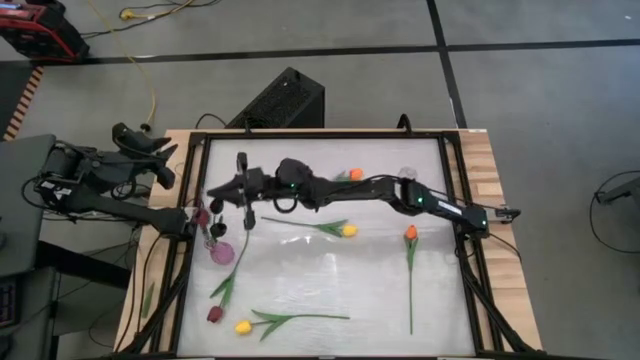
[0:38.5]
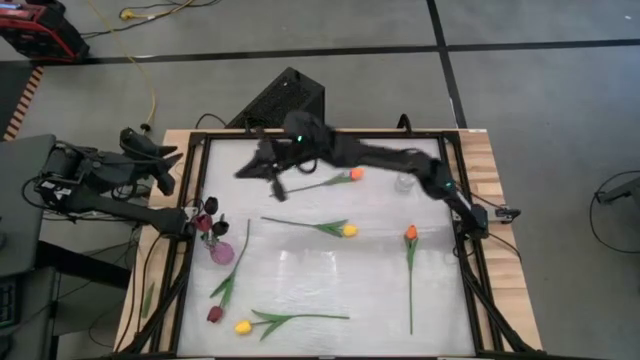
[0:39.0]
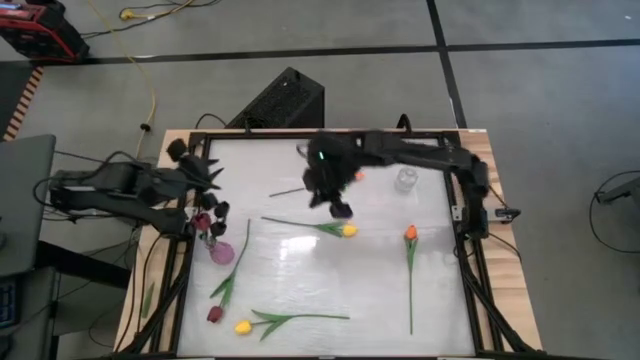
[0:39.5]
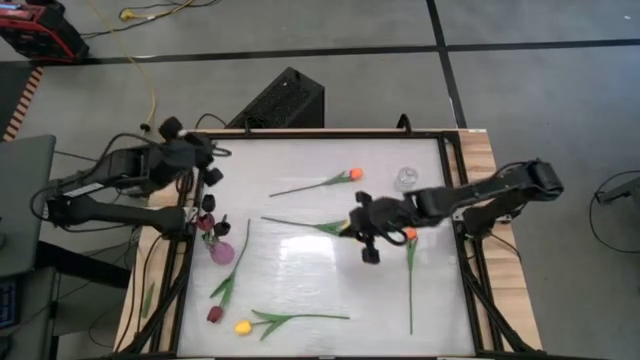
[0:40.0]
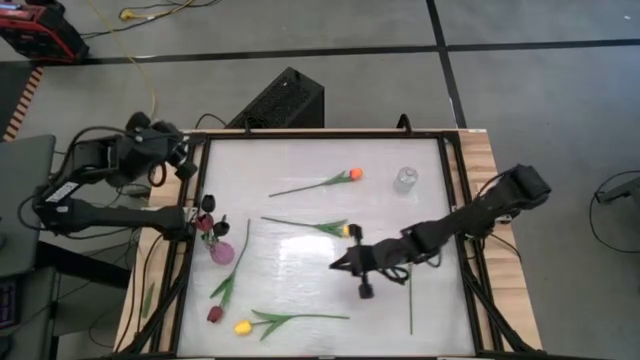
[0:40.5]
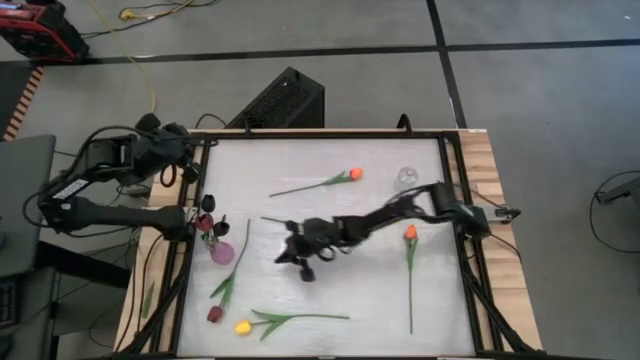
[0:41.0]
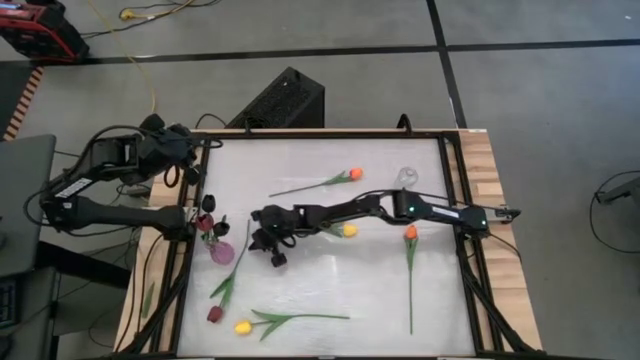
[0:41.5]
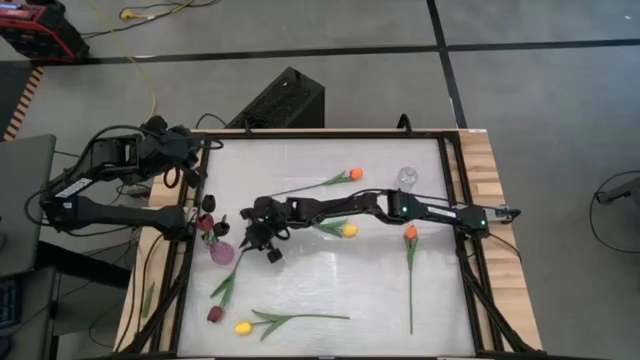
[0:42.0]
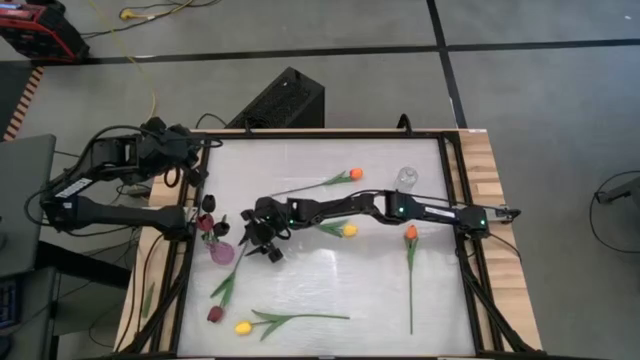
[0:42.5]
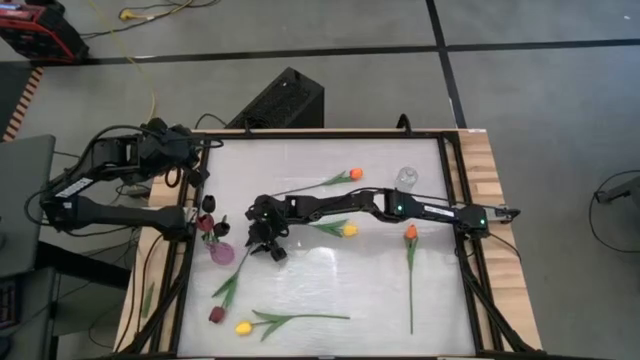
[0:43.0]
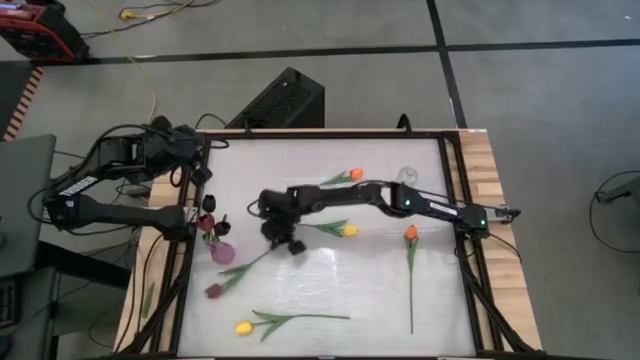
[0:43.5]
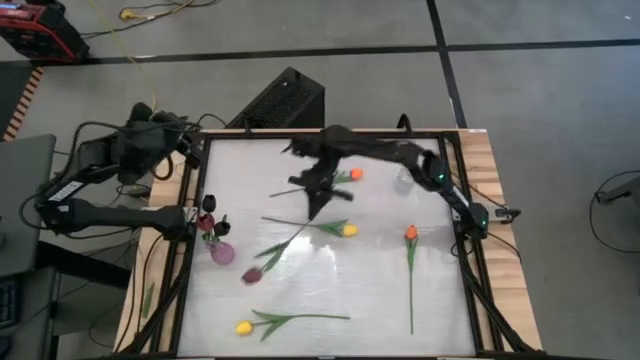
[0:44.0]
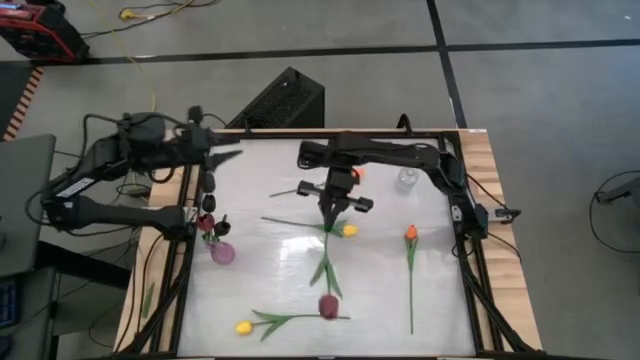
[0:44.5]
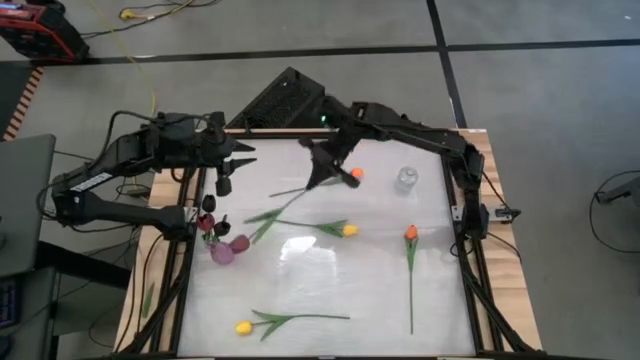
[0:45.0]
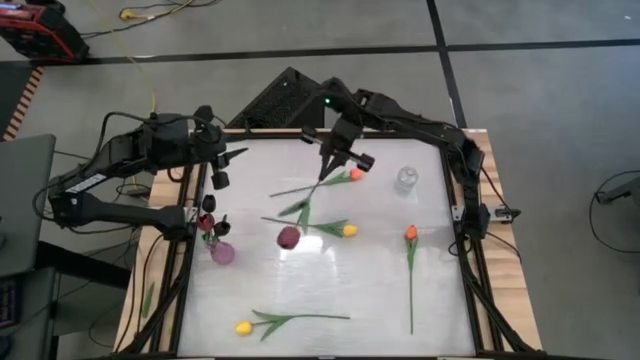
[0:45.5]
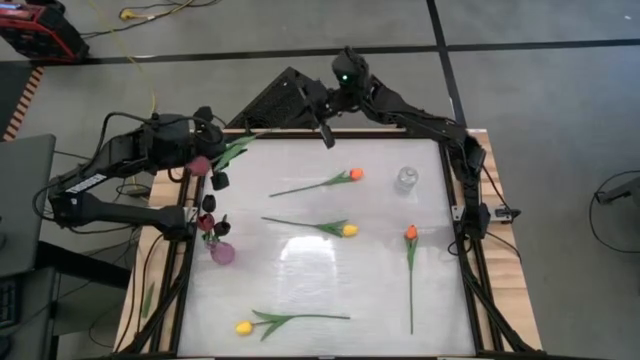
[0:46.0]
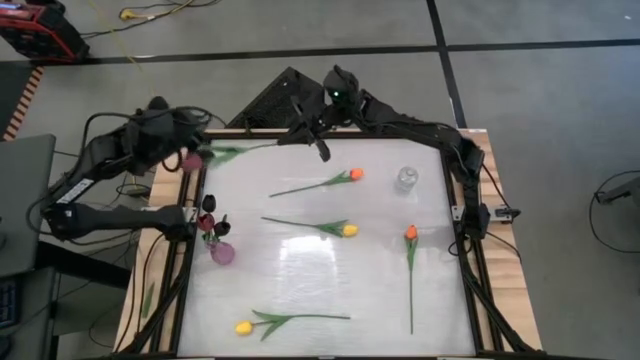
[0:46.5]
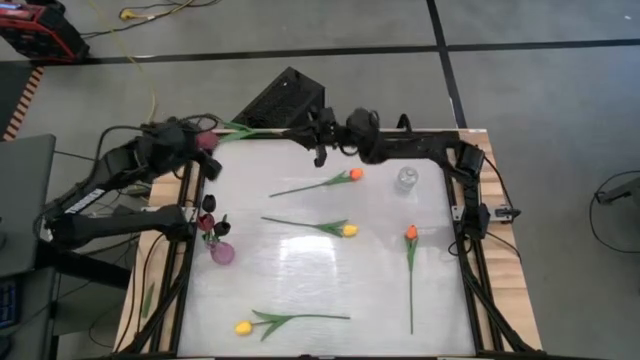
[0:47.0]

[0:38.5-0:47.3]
Task: Sort flowers into vase by color
Put the dark red tulip into the purple vase

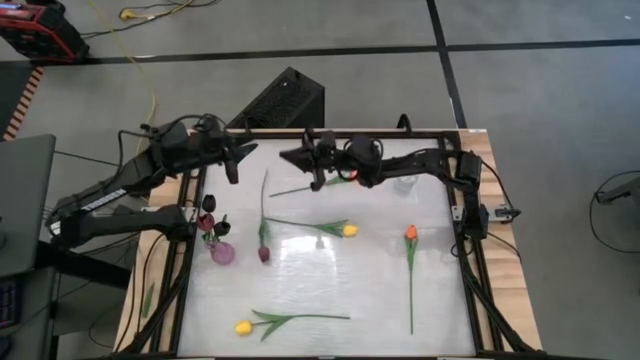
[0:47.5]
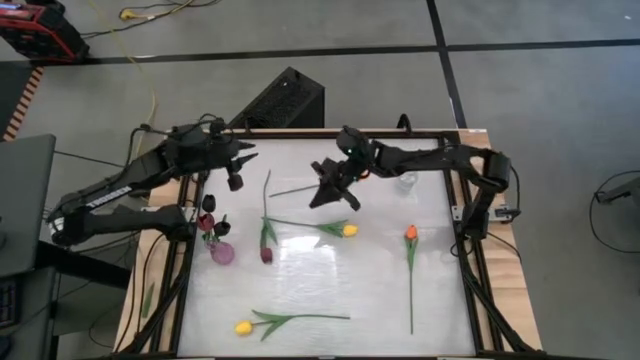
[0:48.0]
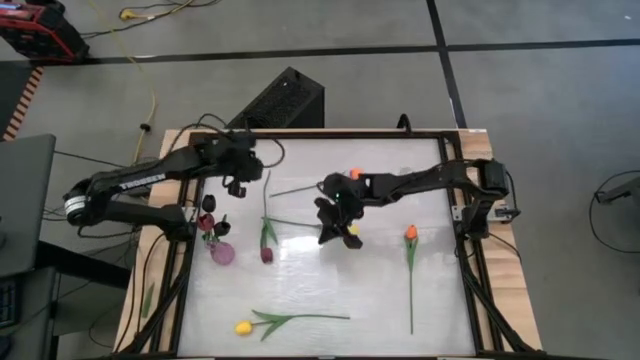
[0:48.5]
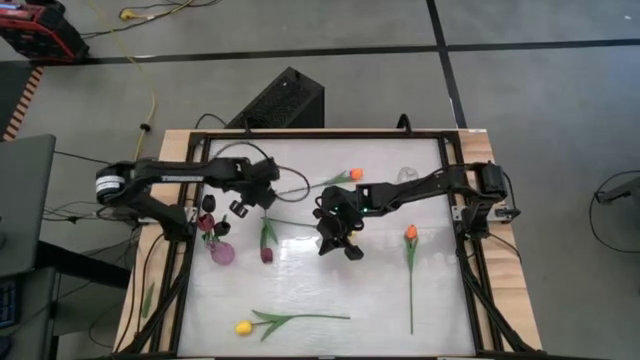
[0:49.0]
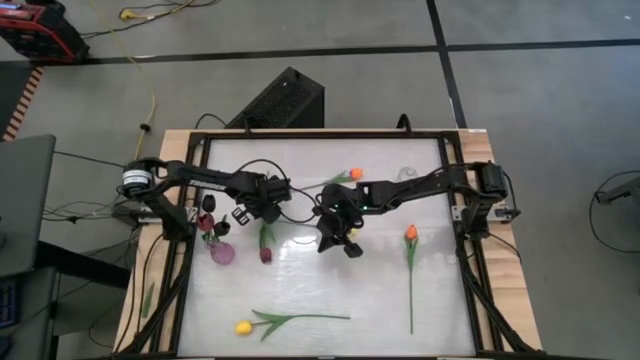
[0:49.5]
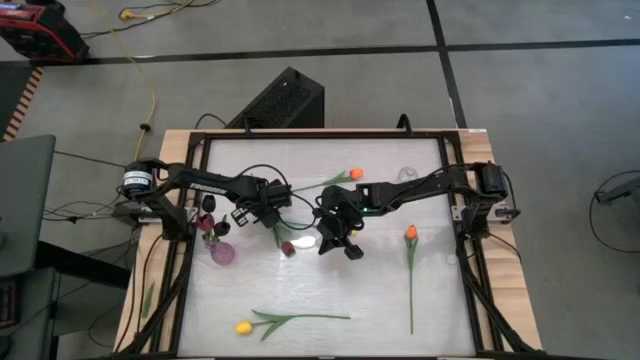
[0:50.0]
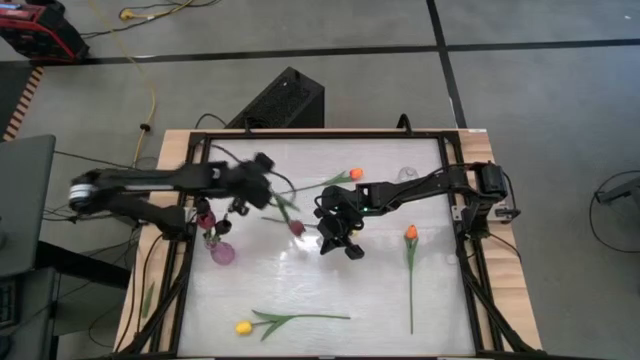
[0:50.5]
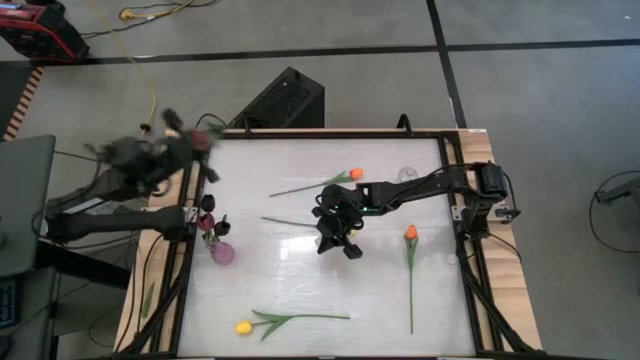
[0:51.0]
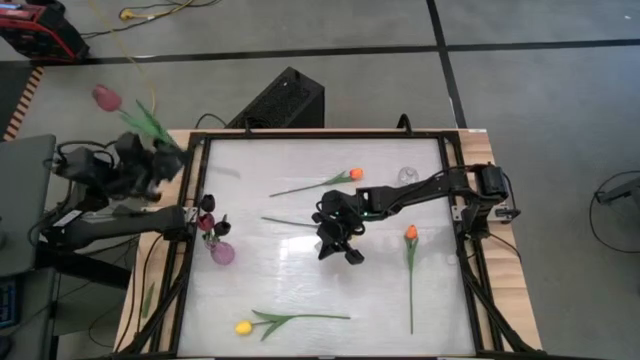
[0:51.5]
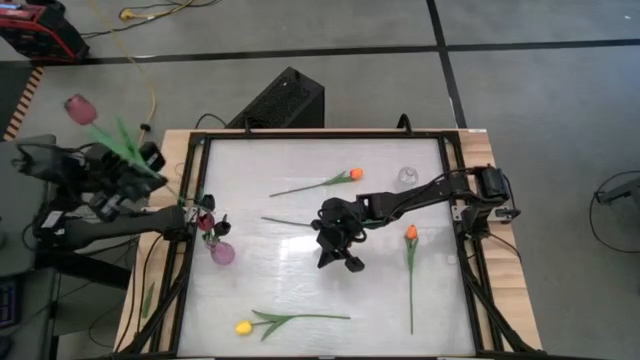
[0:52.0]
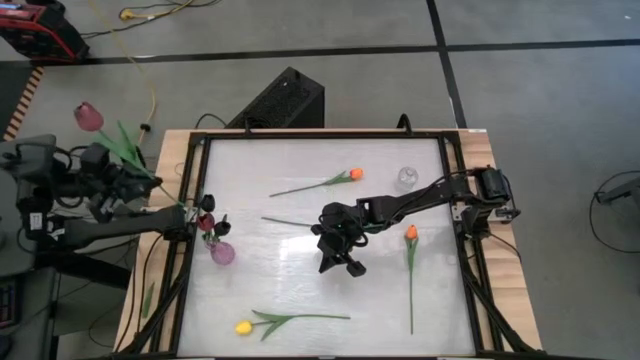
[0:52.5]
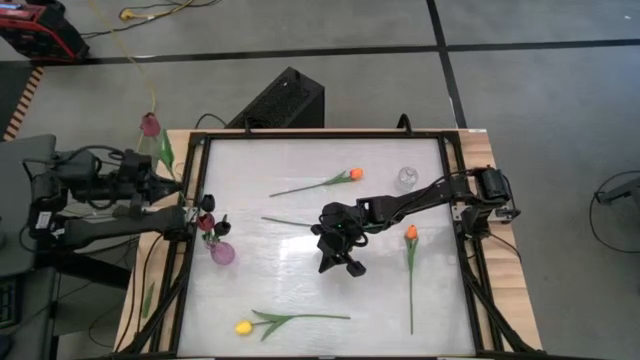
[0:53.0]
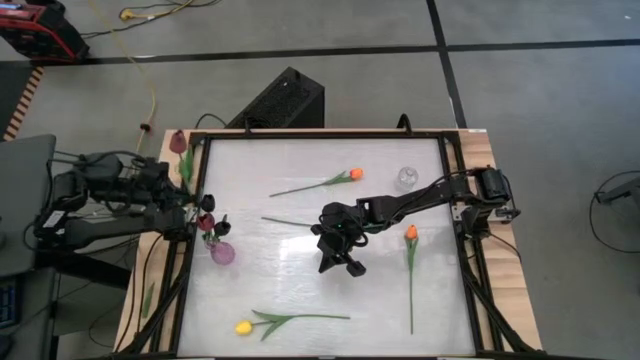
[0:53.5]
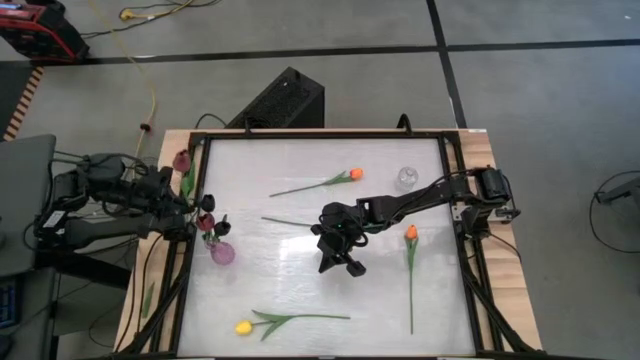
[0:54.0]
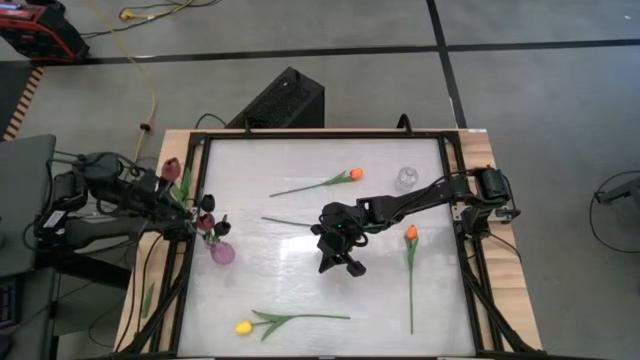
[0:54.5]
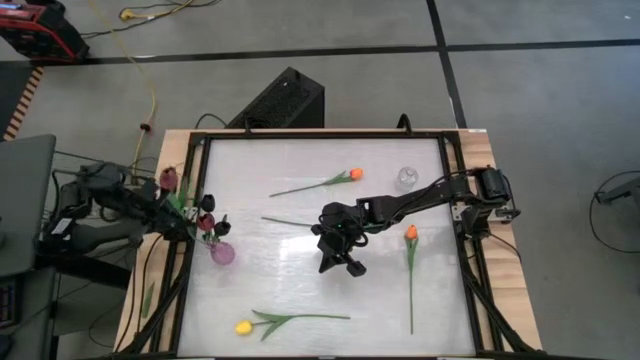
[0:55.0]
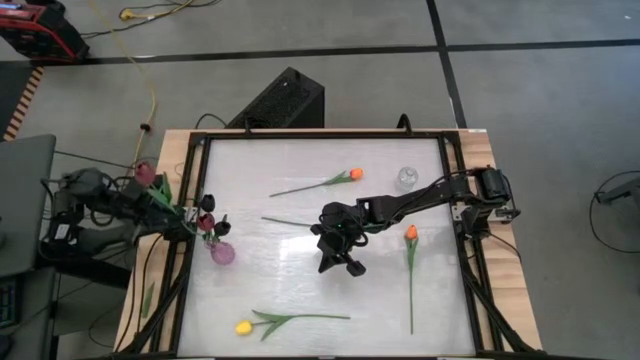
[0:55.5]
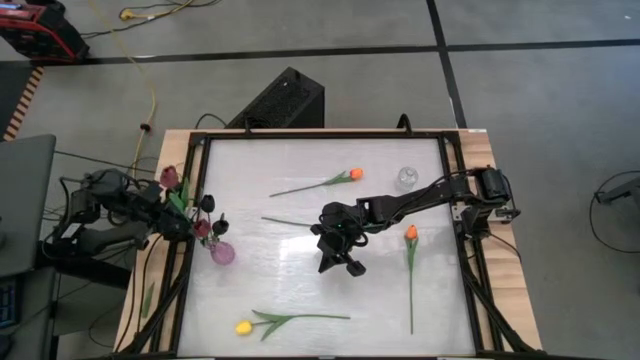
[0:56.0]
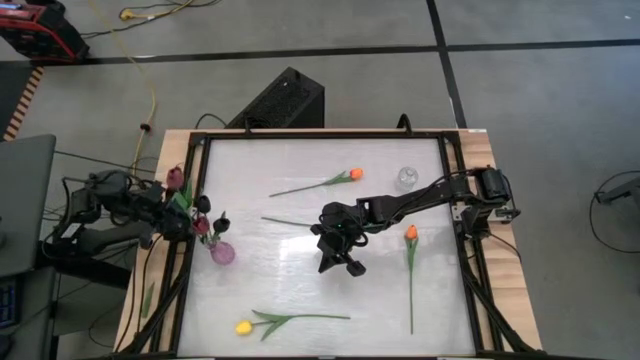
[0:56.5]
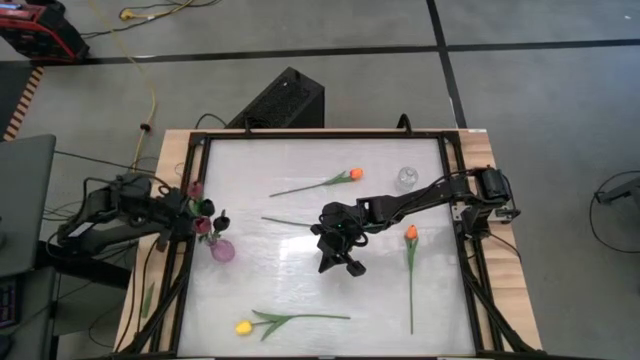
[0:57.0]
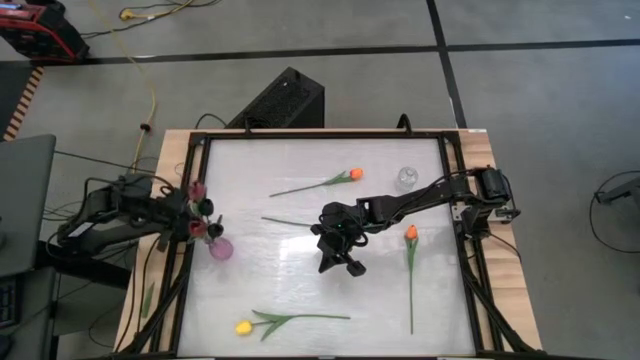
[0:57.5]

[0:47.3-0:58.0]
Put the dark red tulip into the purple vase

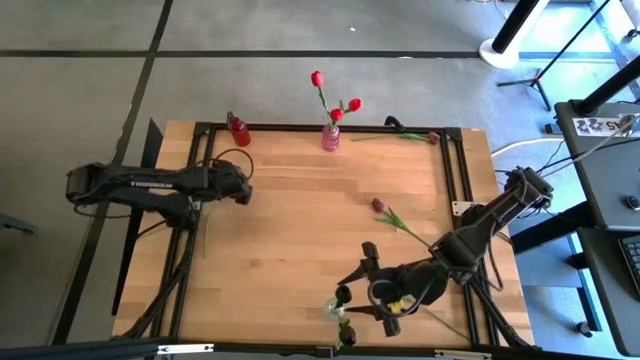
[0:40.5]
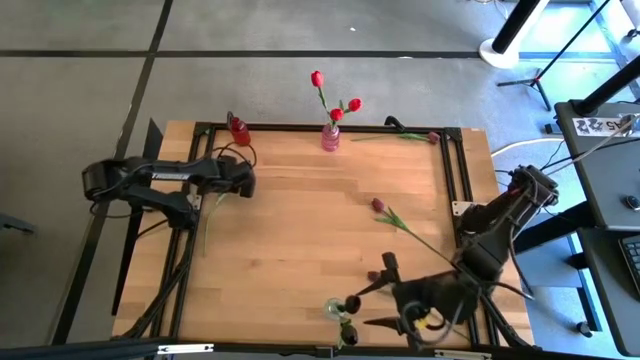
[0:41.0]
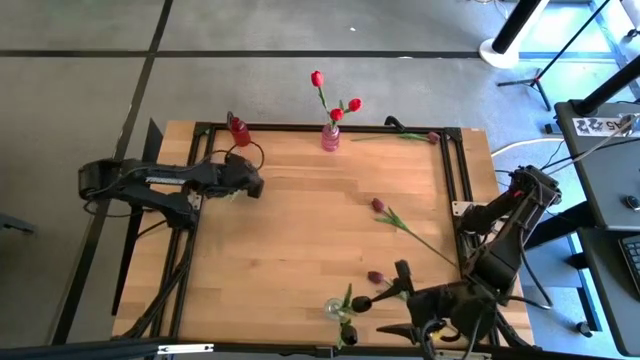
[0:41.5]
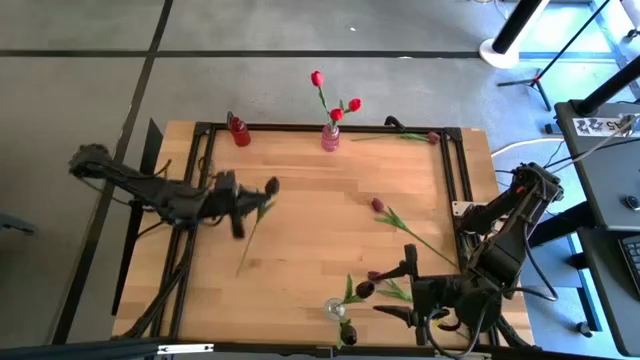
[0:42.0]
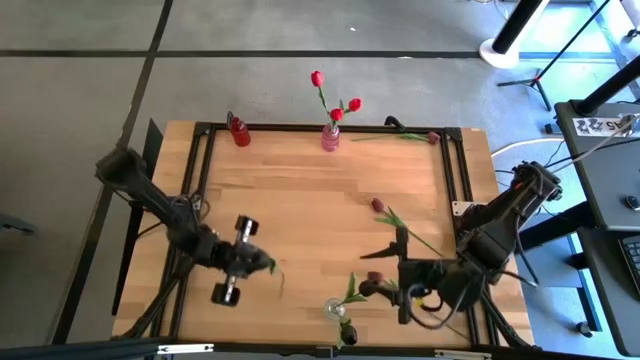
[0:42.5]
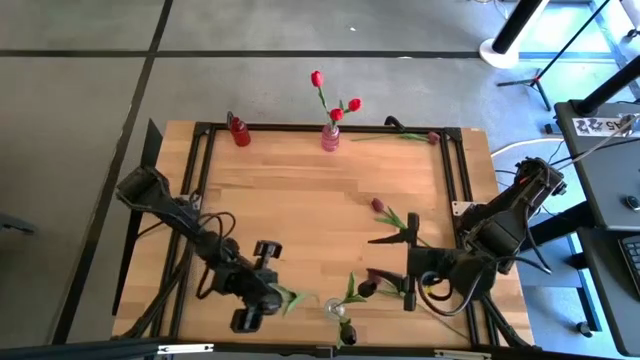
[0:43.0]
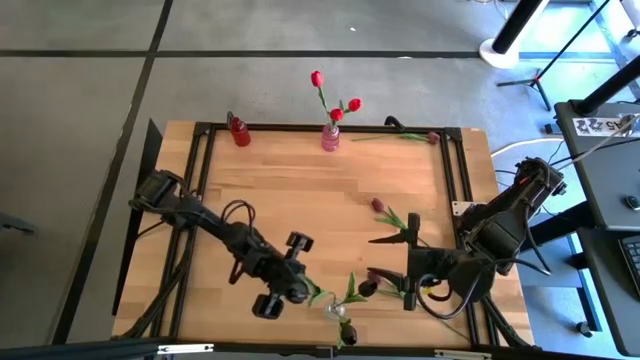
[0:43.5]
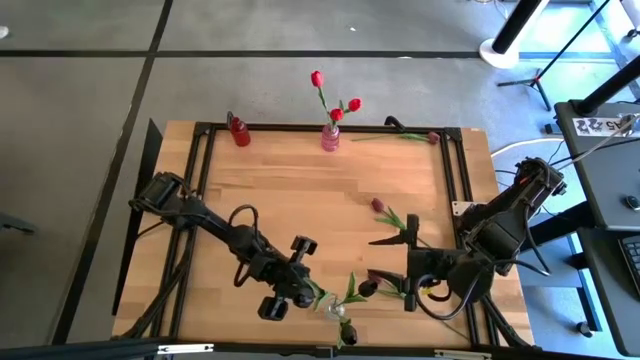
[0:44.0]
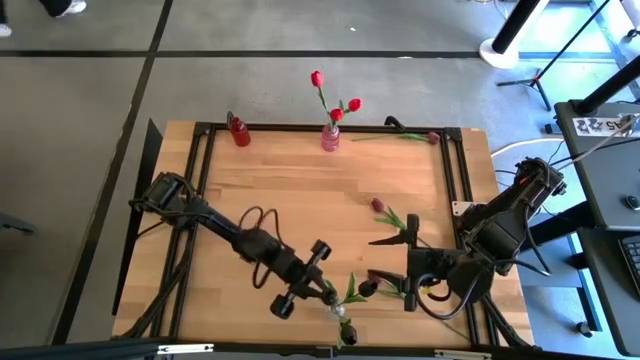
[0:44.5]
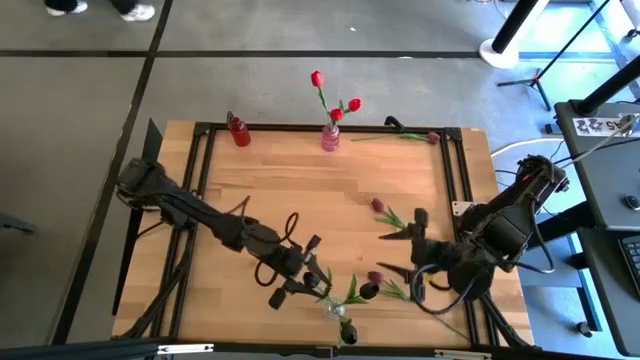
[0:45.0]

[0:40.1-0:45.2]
Task: Sort flowers into vase by color
Put the black flower into the transparent flower vase
